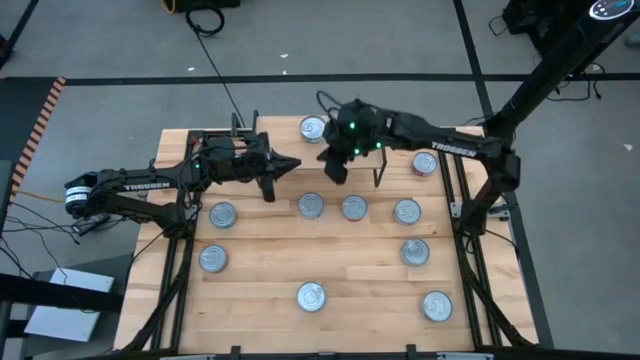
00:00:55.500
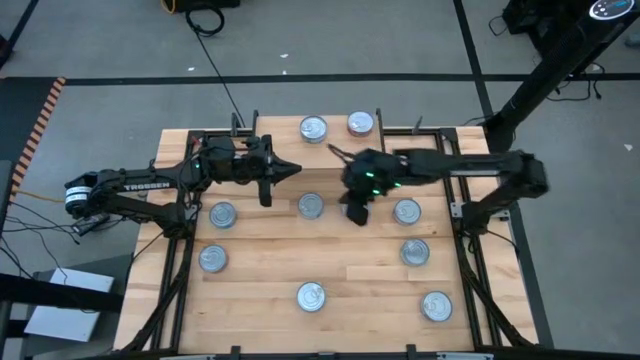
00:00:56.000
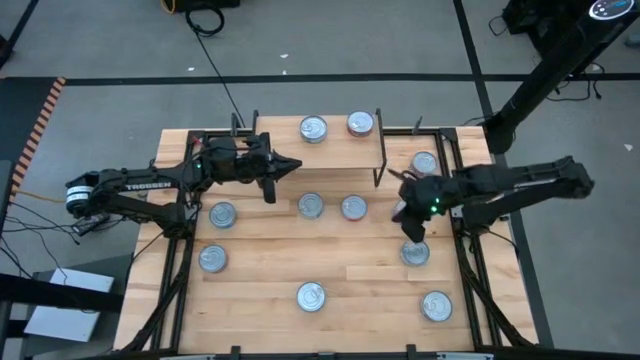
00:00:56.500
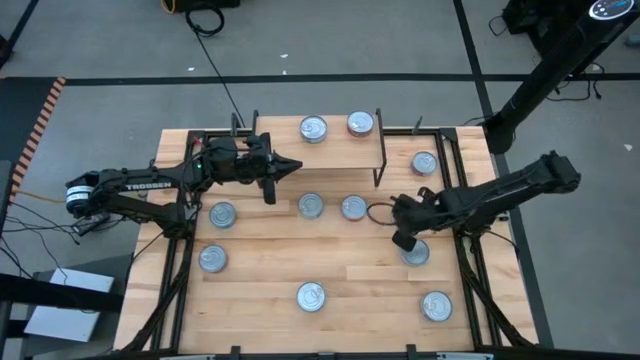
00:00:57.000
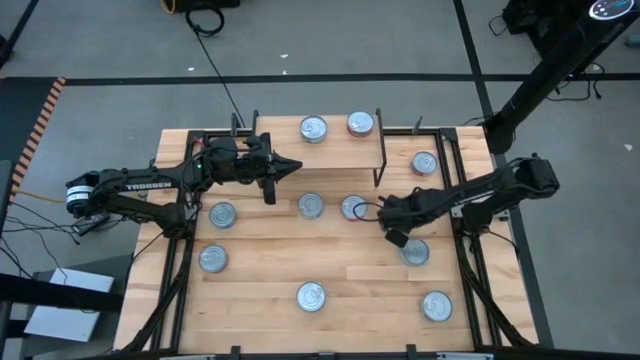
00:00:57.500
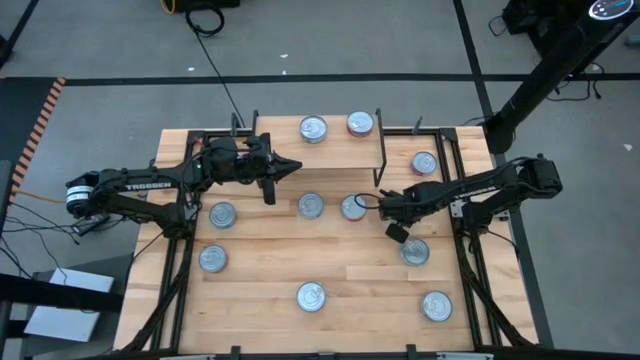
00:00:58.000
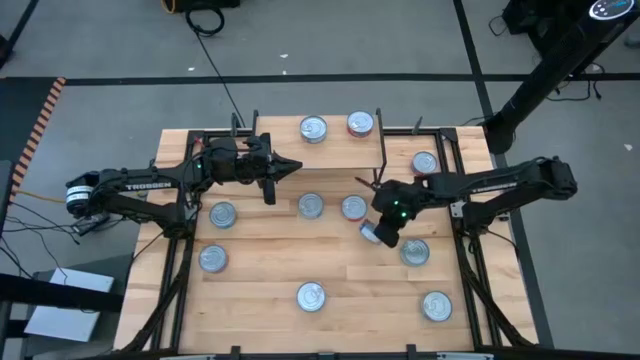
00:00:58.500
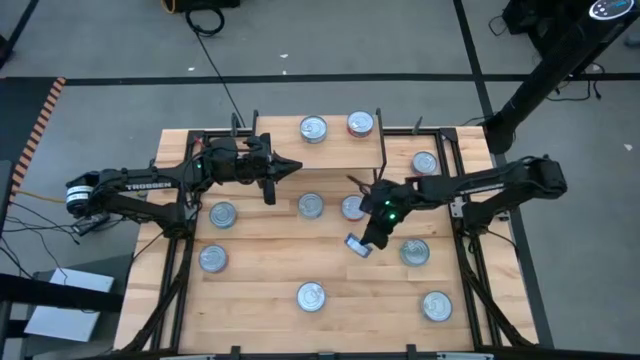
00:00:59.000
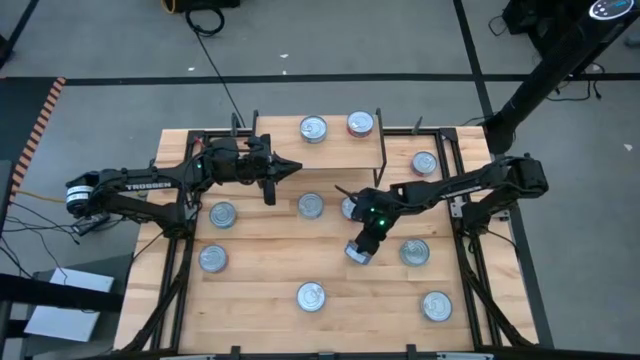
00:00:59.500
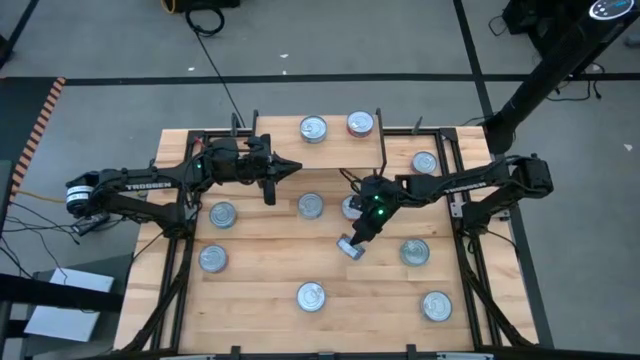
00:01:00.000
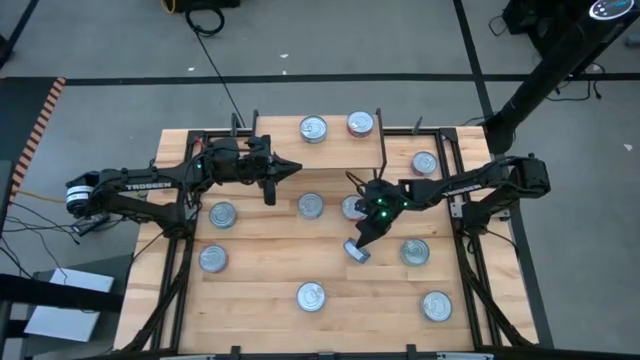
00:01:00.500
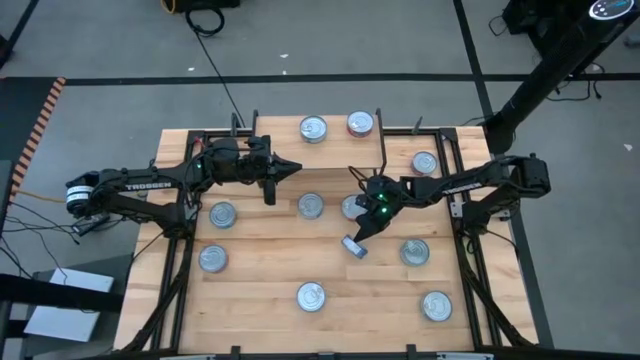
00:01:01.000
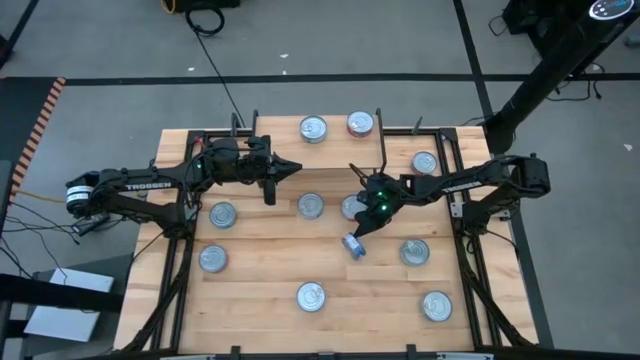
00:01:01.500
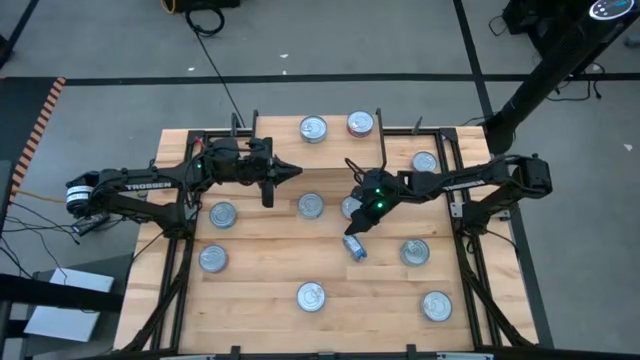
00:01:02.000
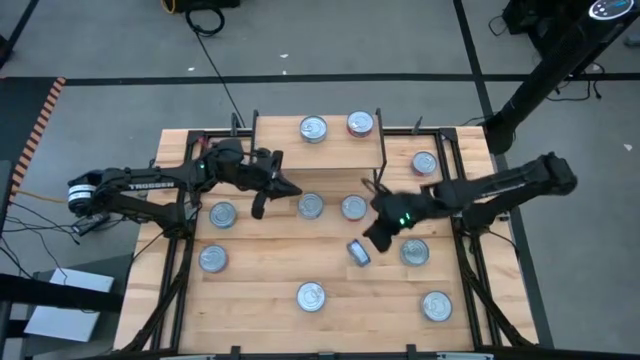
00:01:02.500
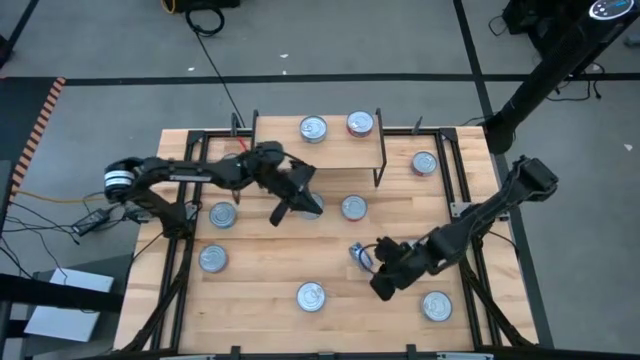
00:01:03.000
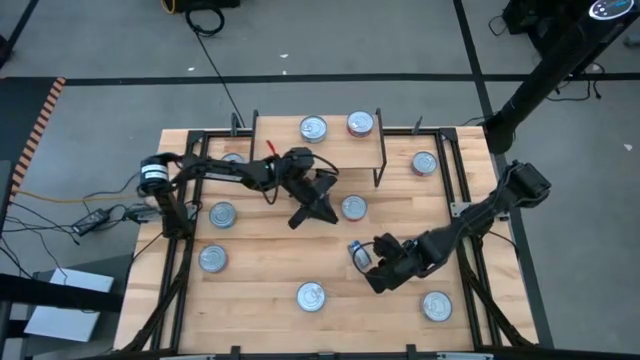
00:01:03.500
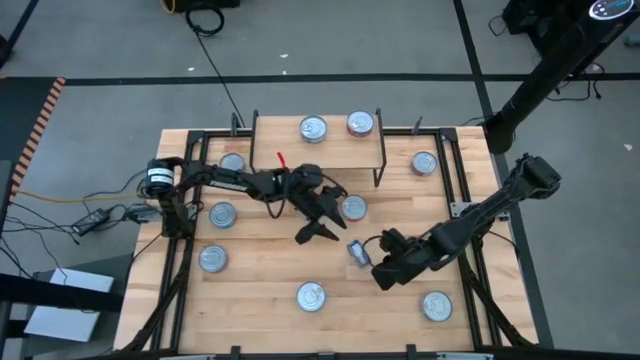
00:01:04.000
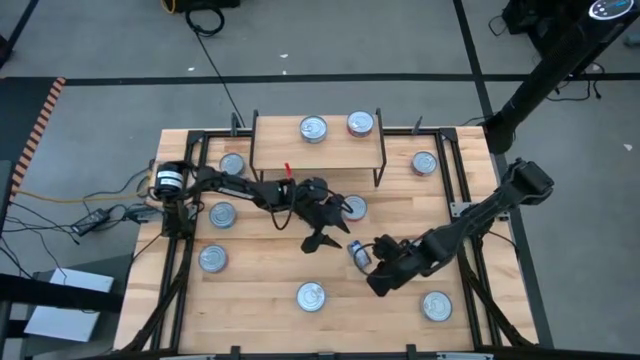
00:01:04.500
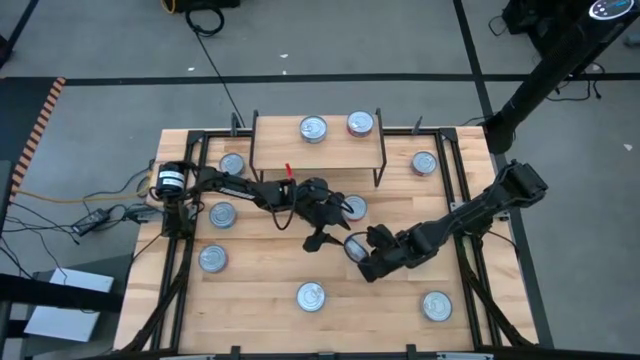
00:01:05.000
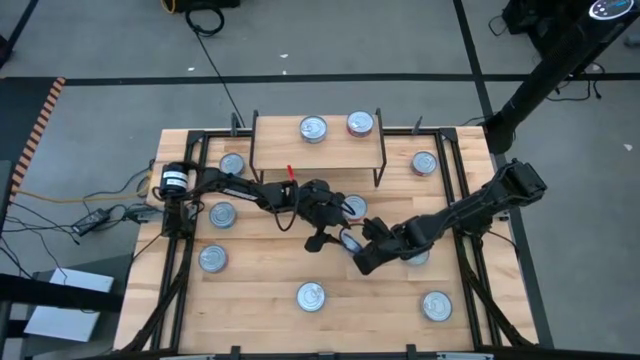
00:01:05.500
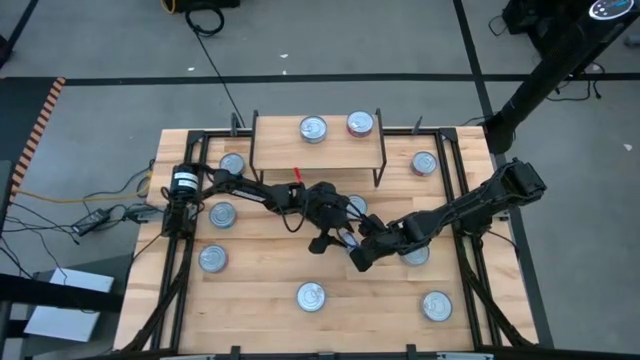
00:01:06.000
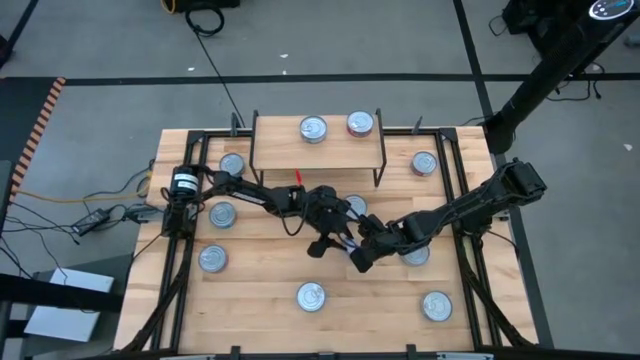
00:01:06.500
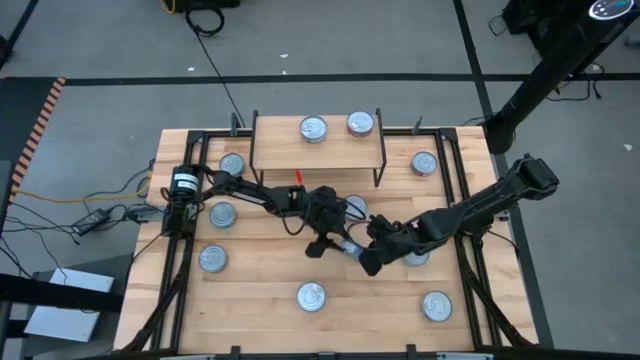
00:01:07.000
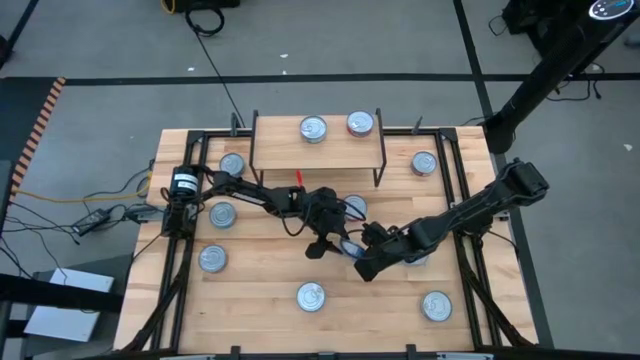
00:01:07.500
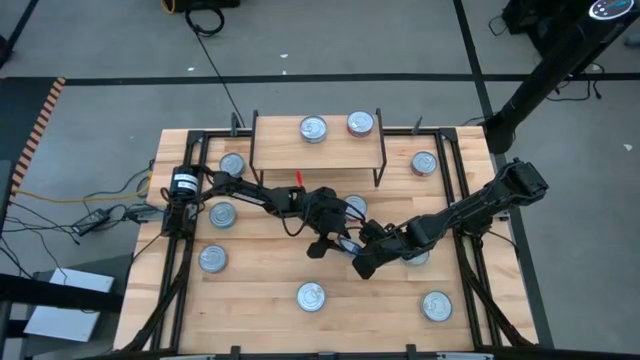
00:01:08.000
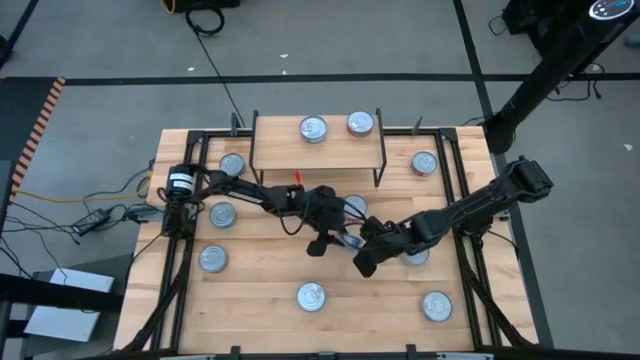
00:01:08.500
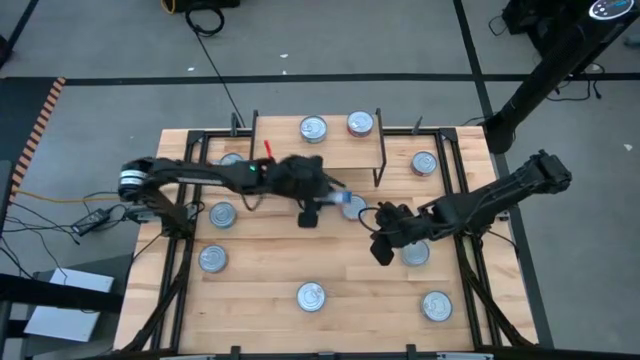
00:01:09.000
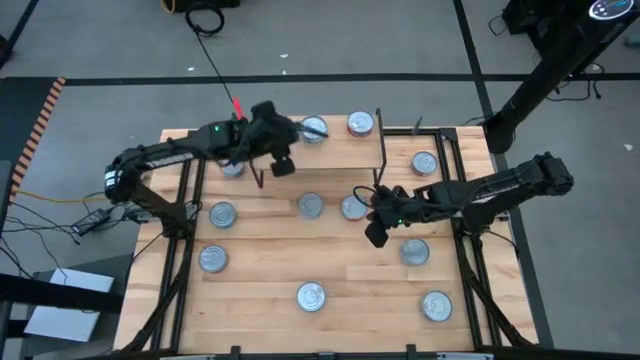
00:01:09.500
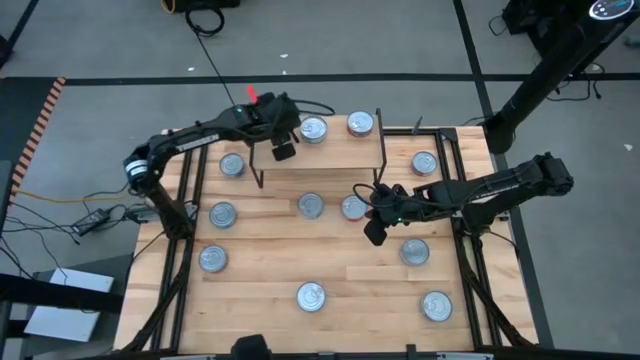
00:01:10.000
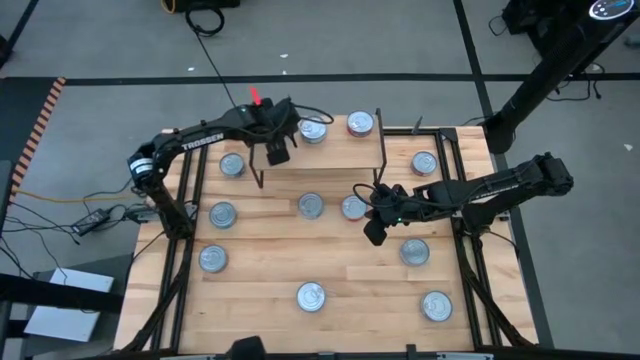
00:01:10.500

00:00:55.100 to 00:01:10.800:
Task: Stack canned seafood by type on shelf
Put the blue tuna can on the shelf

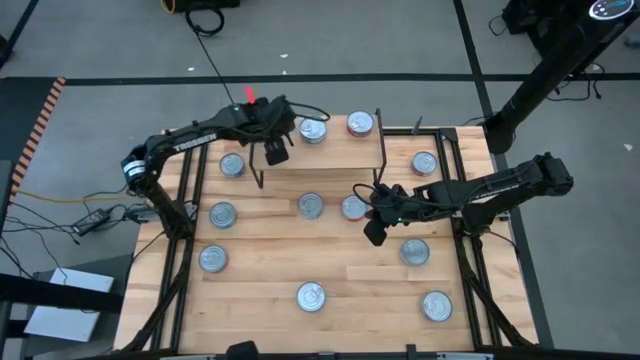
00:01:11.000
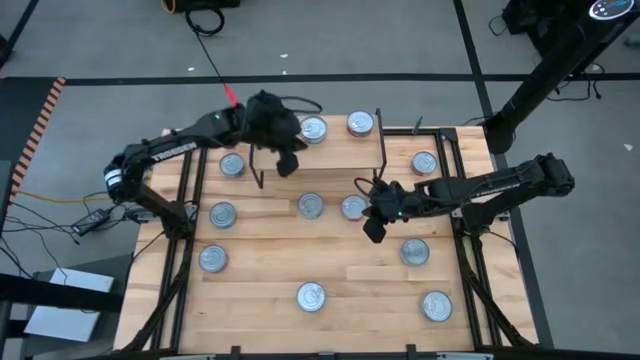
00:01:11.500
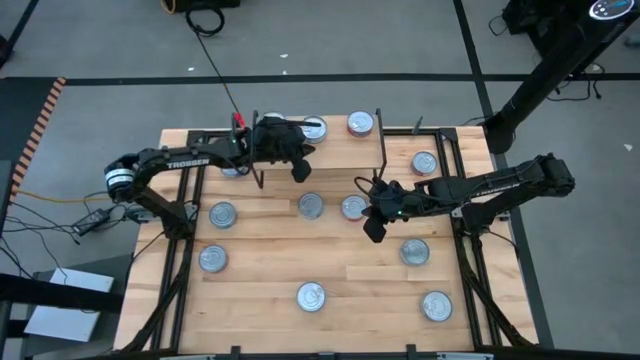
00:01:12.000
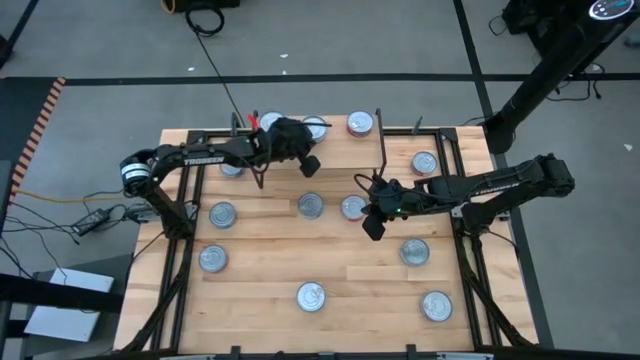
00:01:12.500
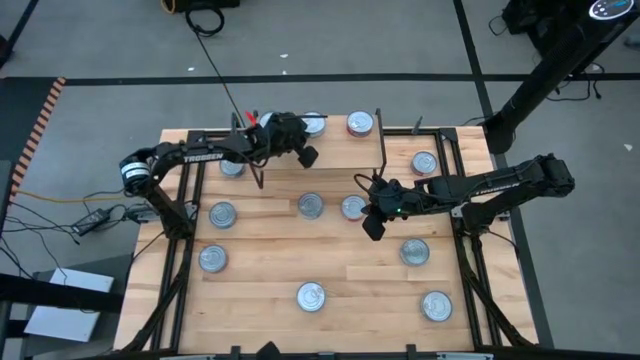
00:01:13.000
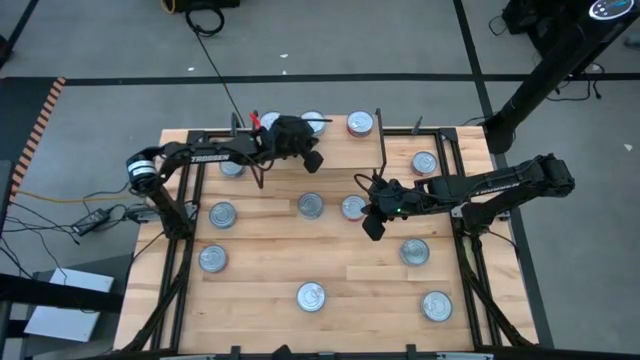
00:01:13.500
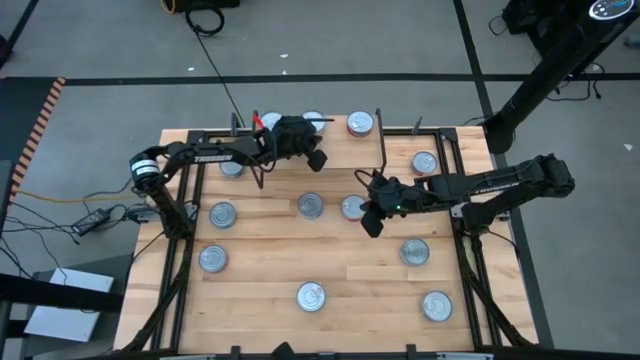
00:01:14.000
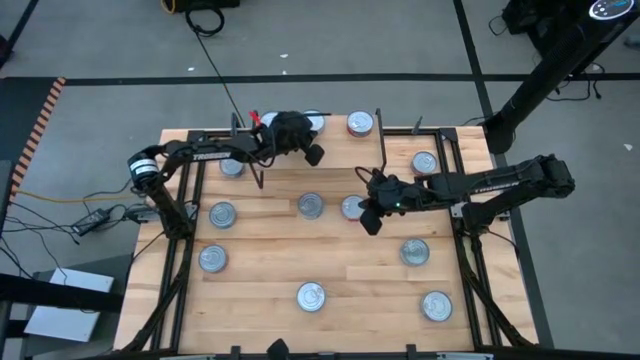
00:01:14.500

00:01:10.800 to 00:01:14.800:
Adjust the yellow-blue tuna can on the shelf

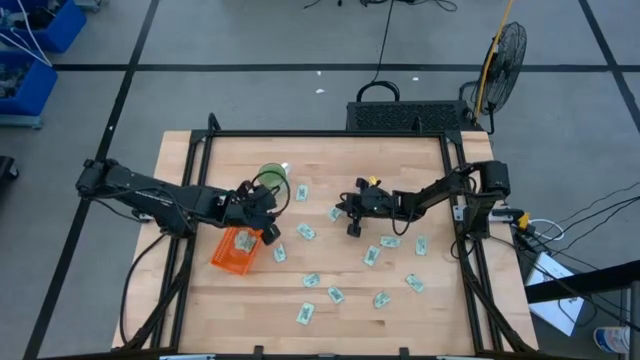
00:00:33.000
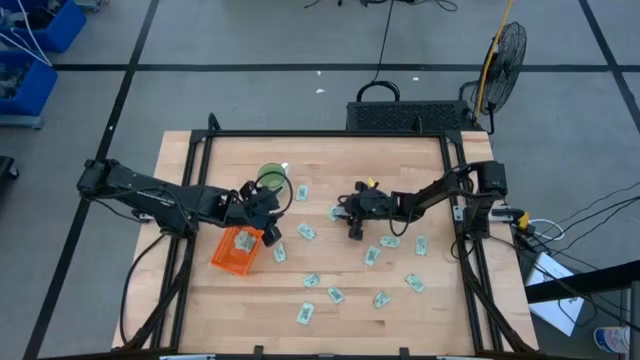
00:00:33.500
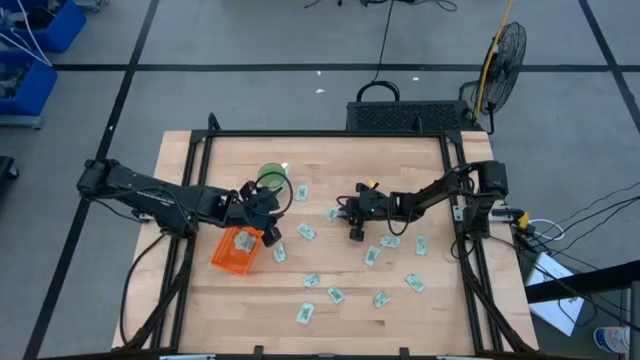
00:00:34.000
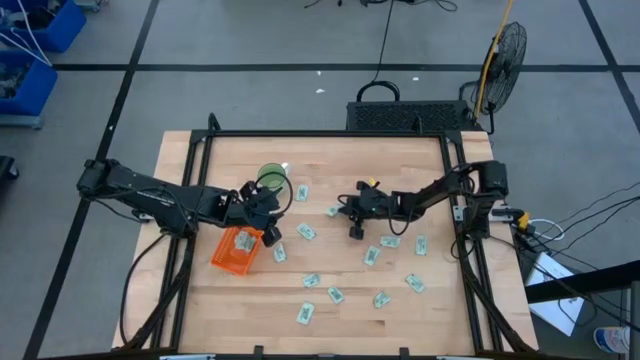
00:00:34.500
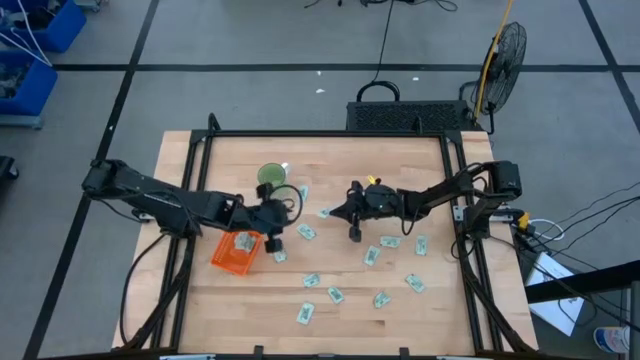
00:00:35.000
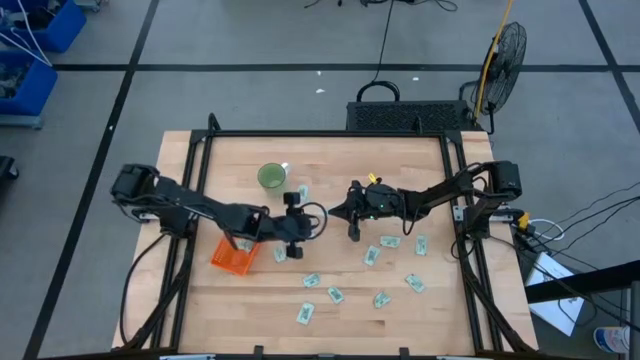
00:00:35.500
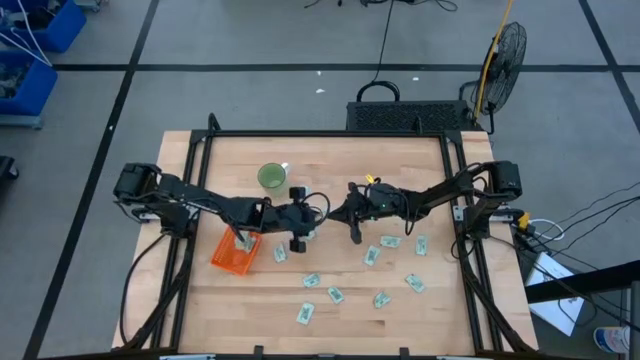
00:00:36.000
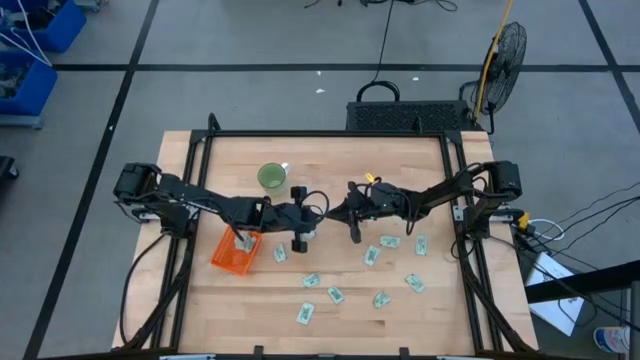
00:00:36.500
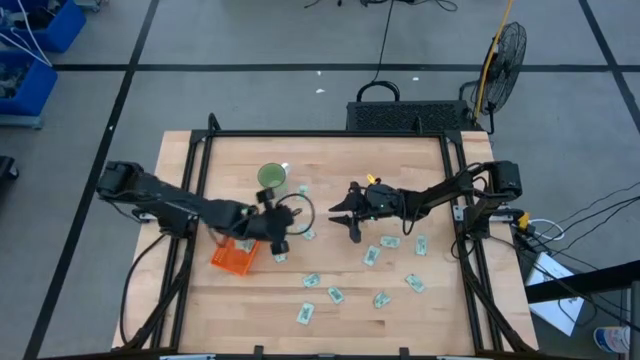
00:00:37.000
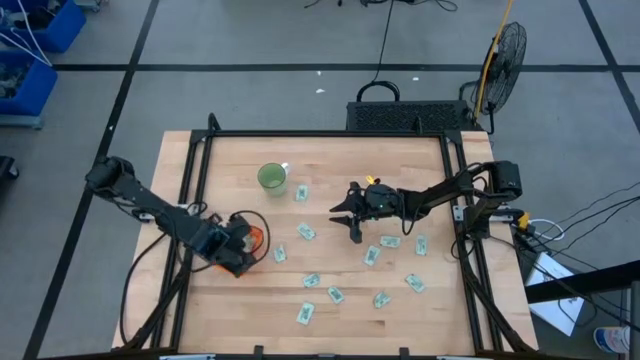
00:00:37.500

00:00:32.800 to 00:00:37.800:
Task: Pick and place Stevia / Truvia into bins
Put the stevia packet into the orange bin
